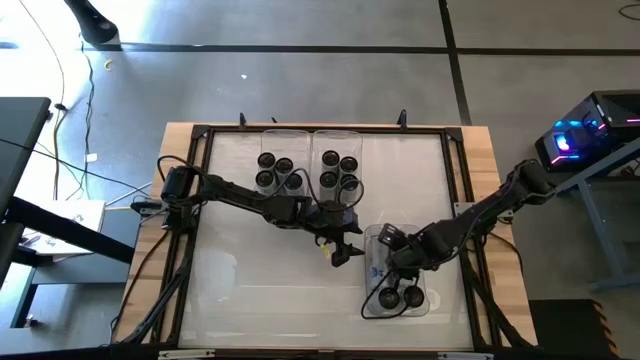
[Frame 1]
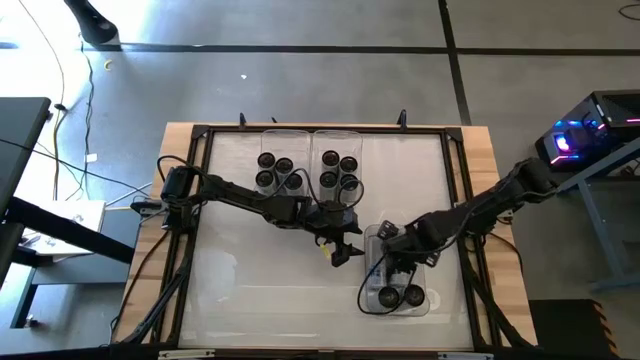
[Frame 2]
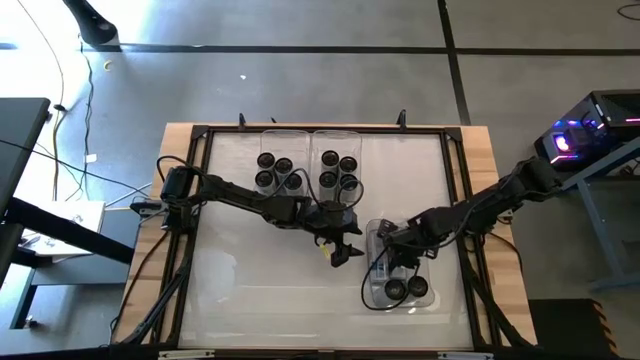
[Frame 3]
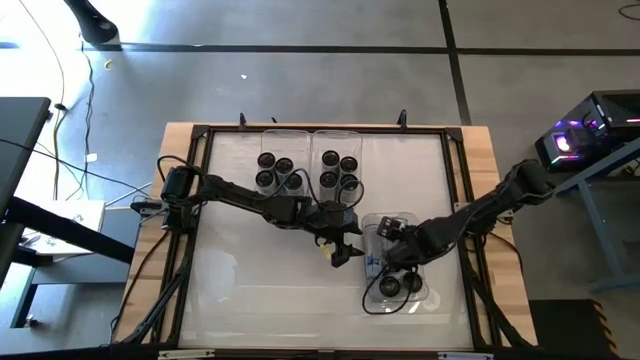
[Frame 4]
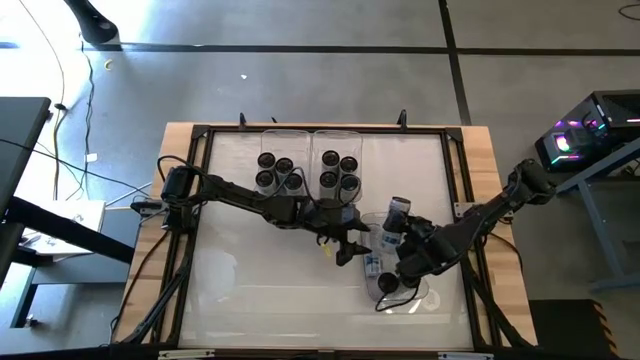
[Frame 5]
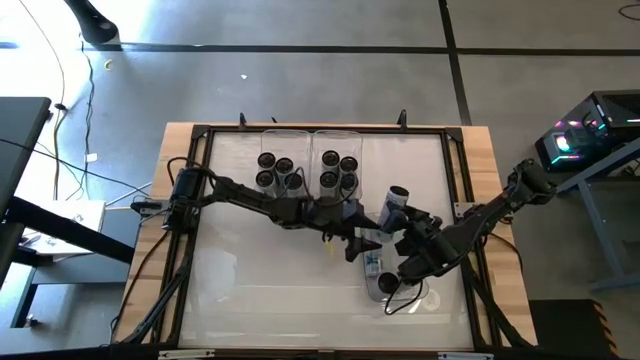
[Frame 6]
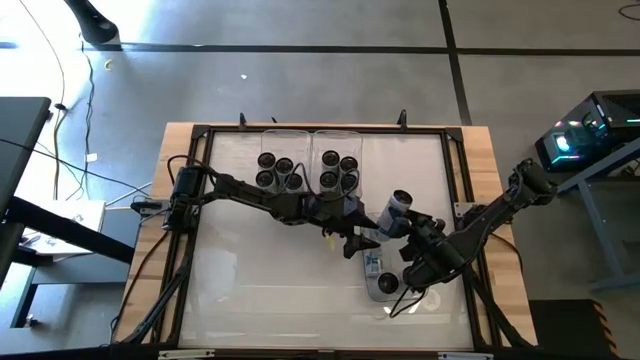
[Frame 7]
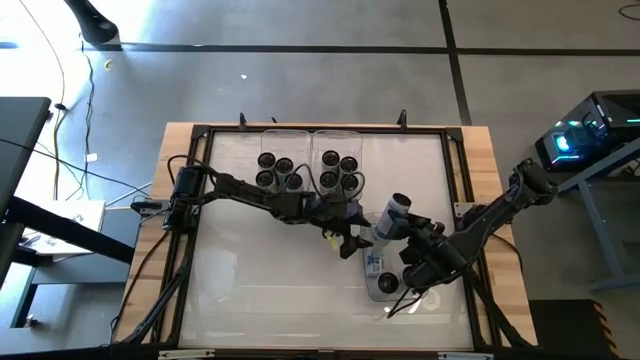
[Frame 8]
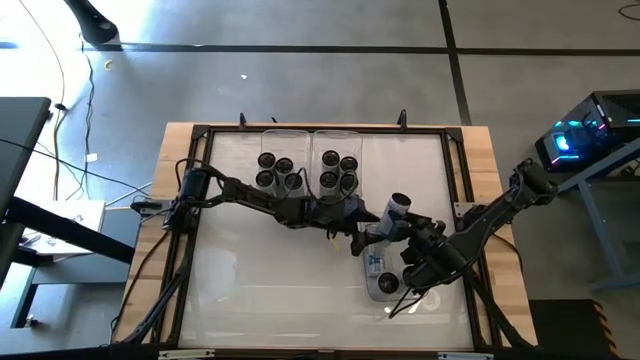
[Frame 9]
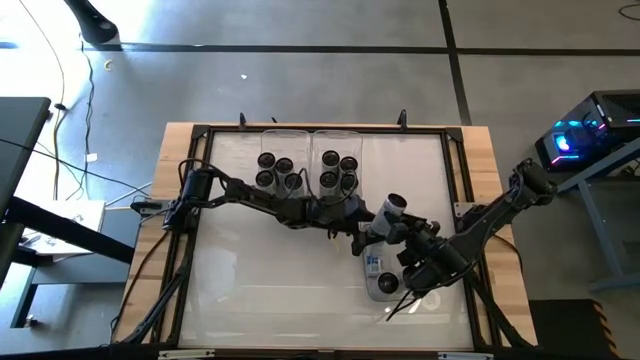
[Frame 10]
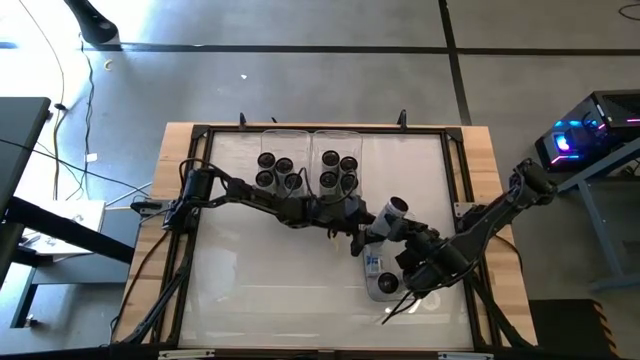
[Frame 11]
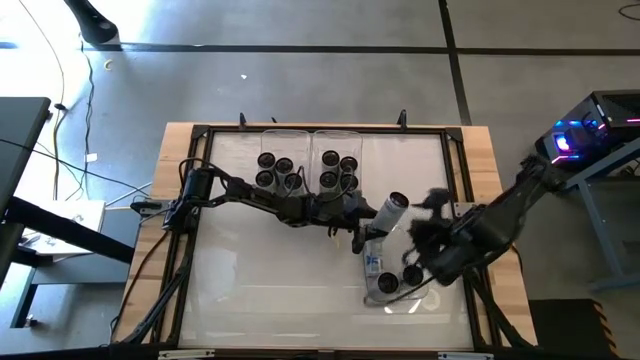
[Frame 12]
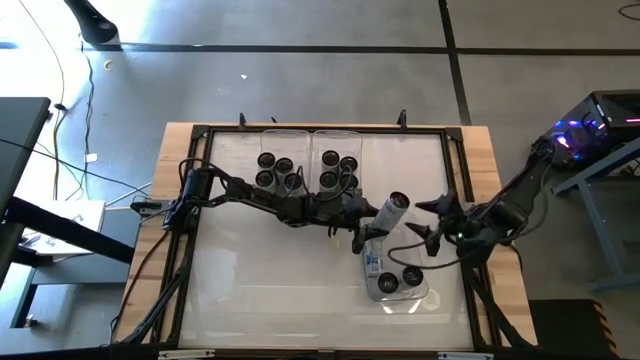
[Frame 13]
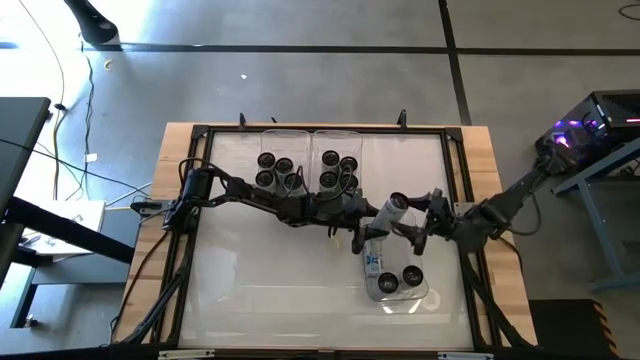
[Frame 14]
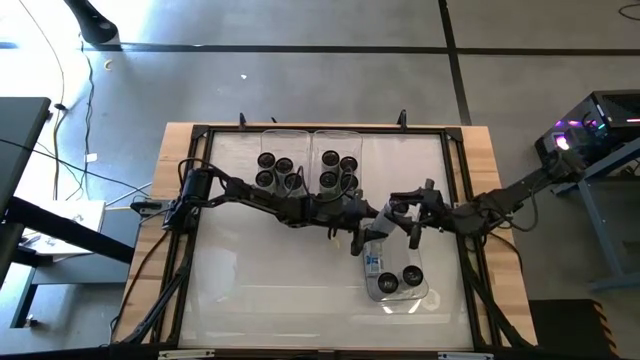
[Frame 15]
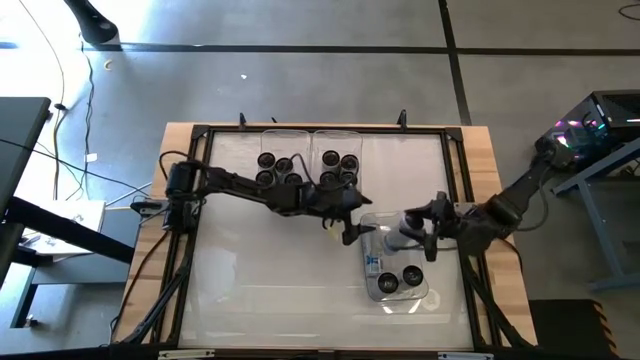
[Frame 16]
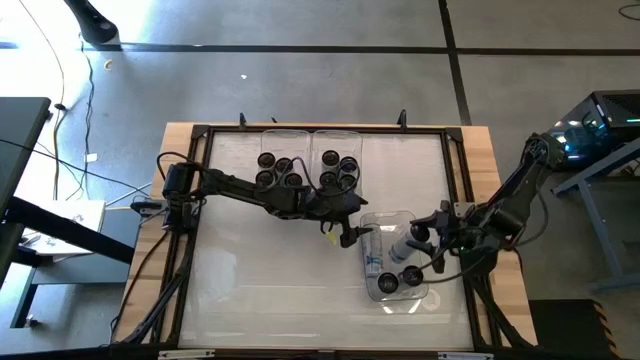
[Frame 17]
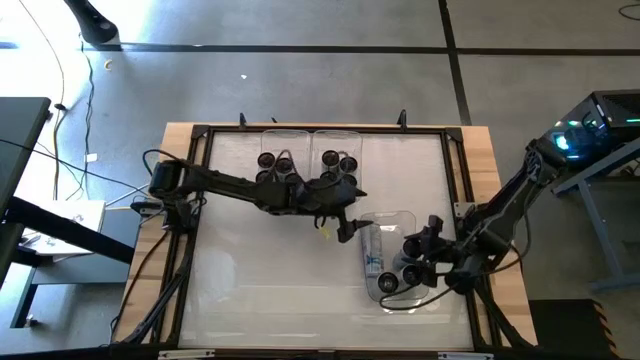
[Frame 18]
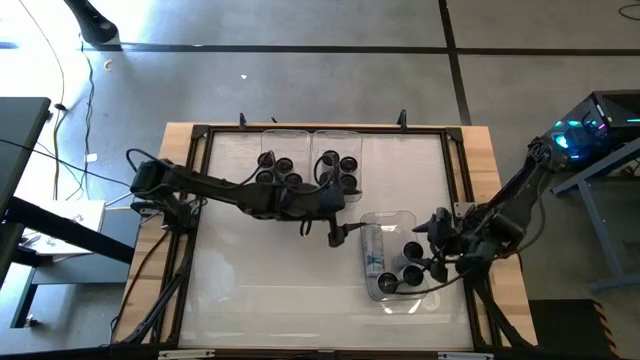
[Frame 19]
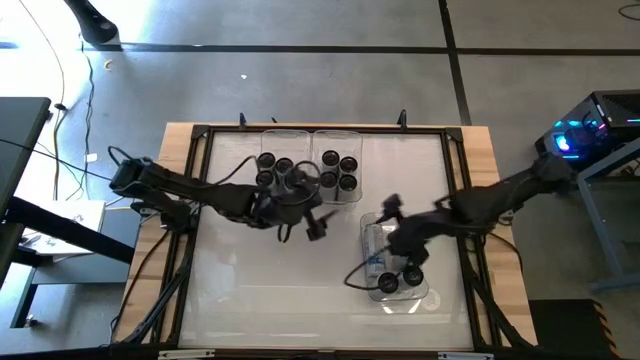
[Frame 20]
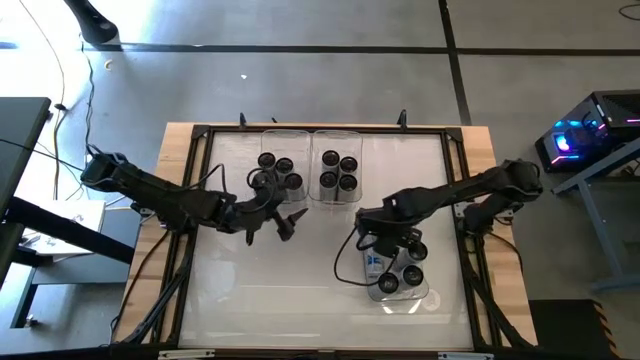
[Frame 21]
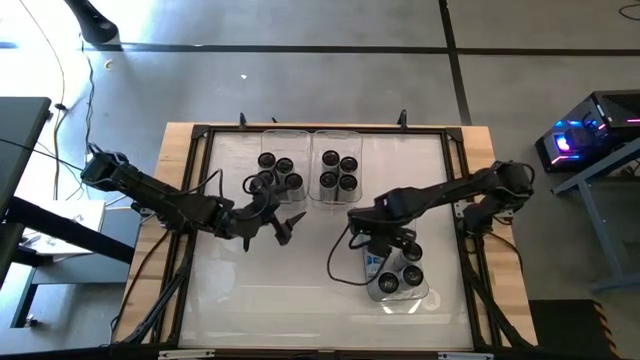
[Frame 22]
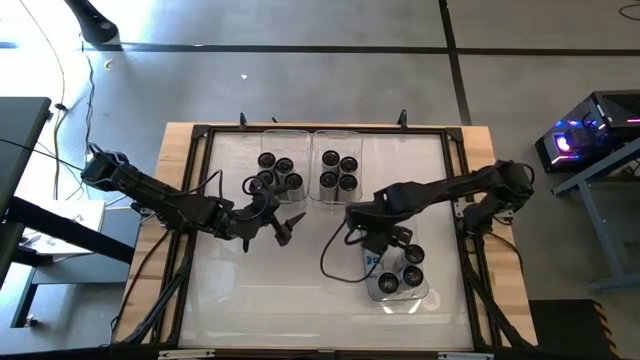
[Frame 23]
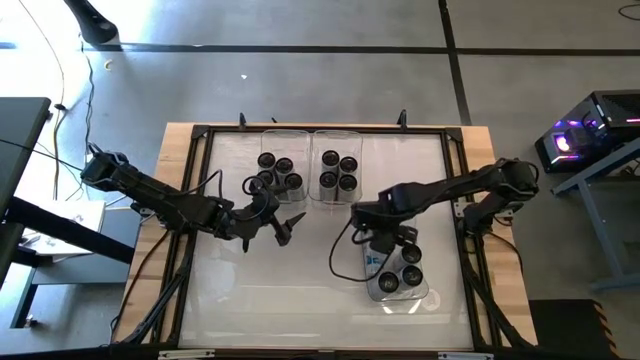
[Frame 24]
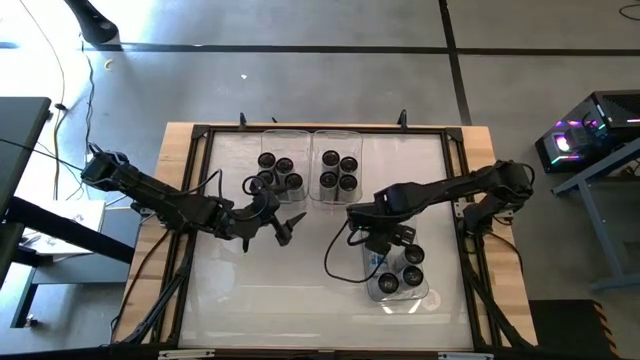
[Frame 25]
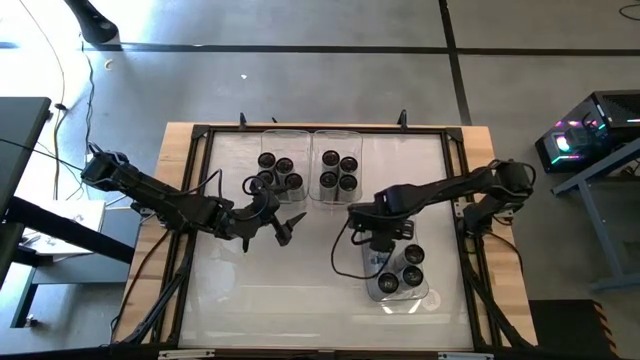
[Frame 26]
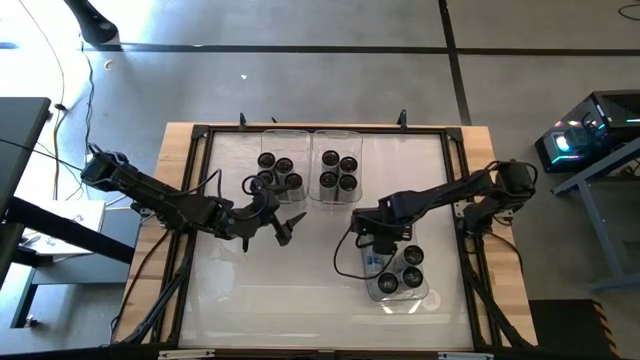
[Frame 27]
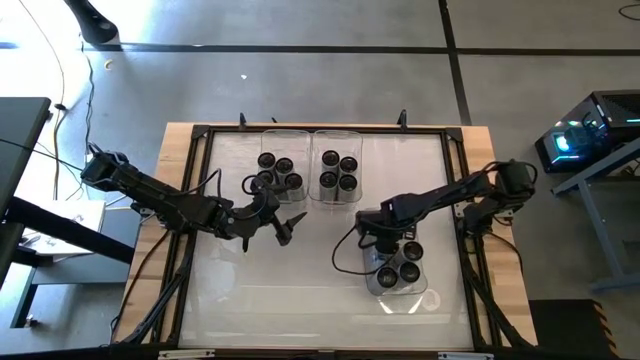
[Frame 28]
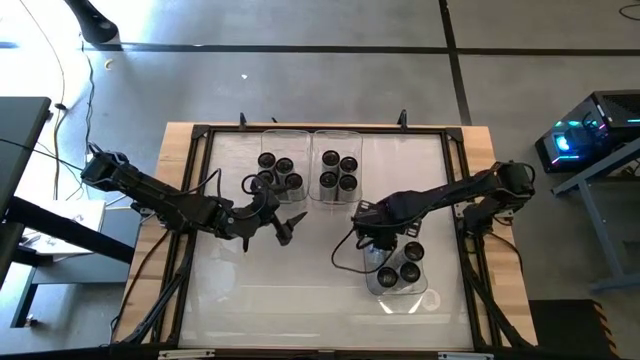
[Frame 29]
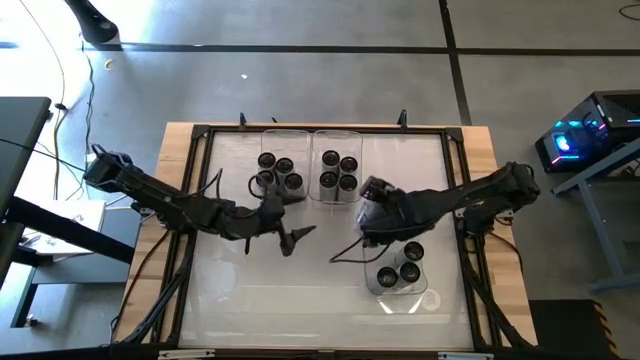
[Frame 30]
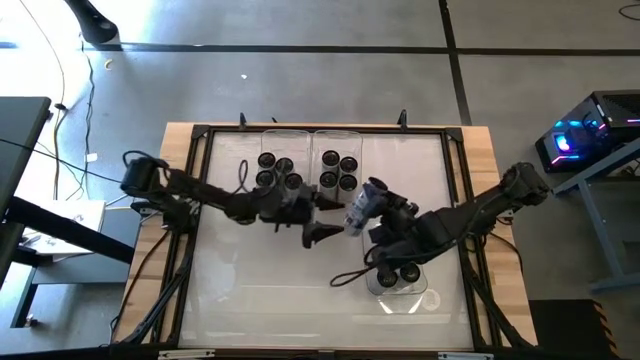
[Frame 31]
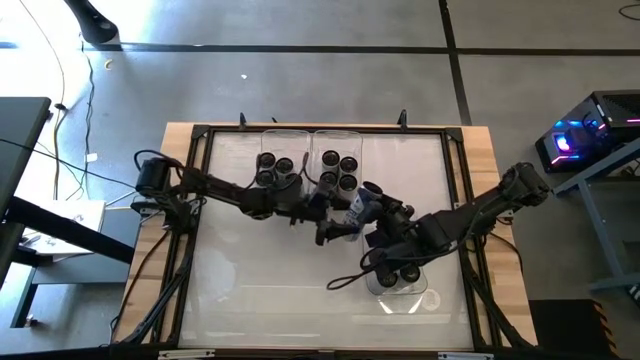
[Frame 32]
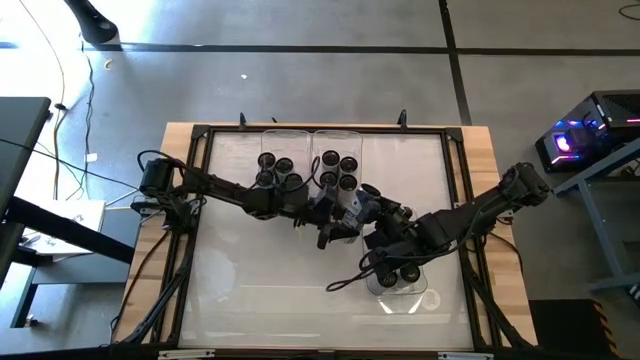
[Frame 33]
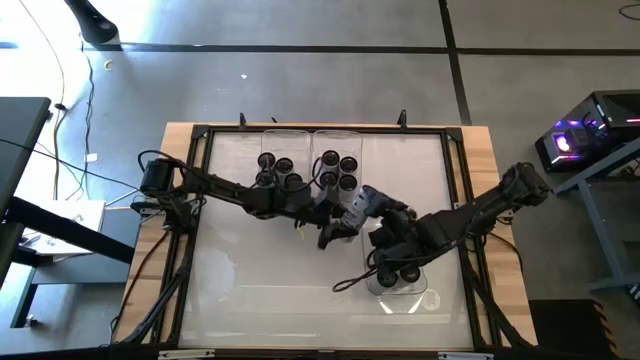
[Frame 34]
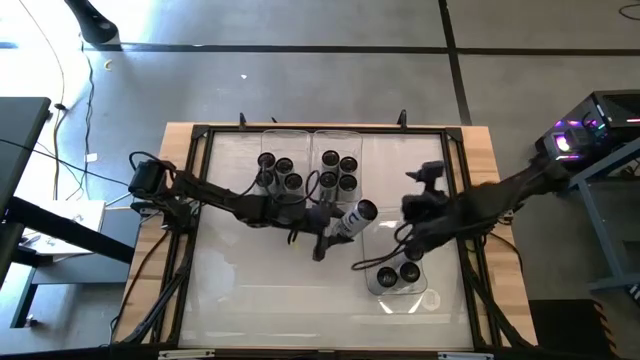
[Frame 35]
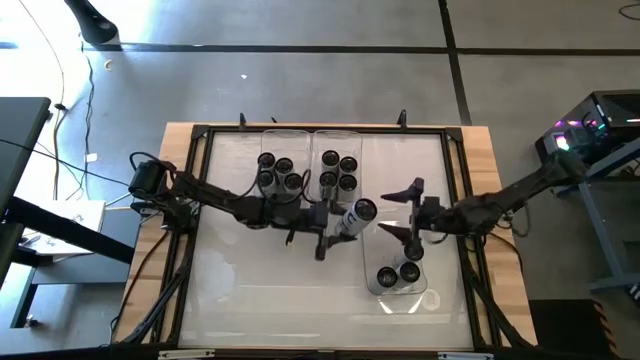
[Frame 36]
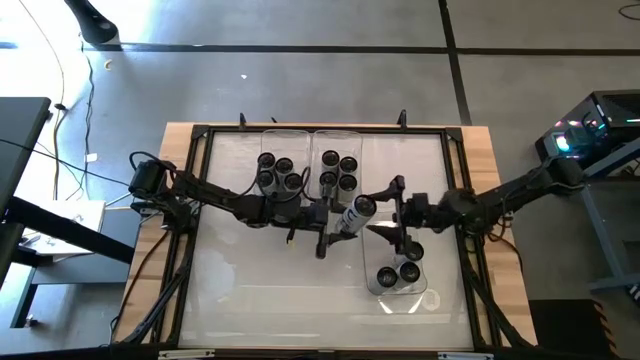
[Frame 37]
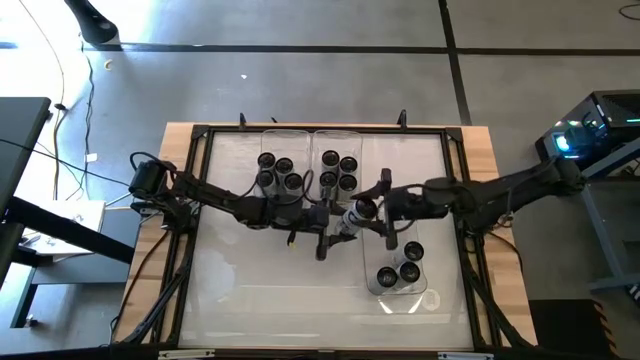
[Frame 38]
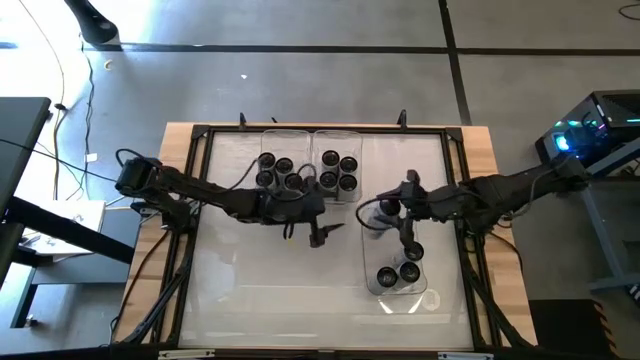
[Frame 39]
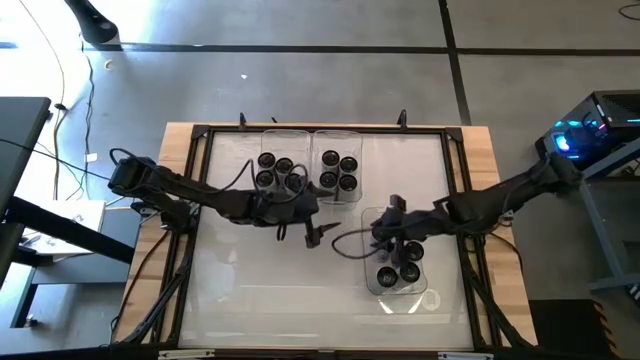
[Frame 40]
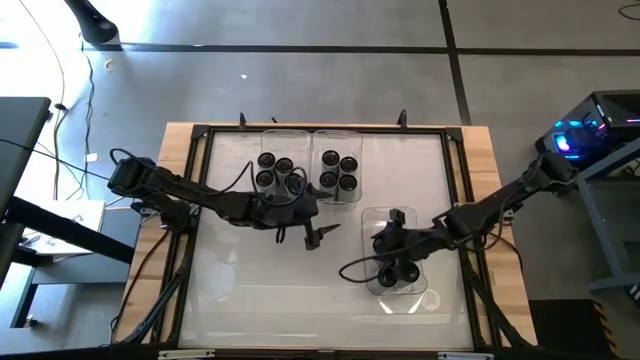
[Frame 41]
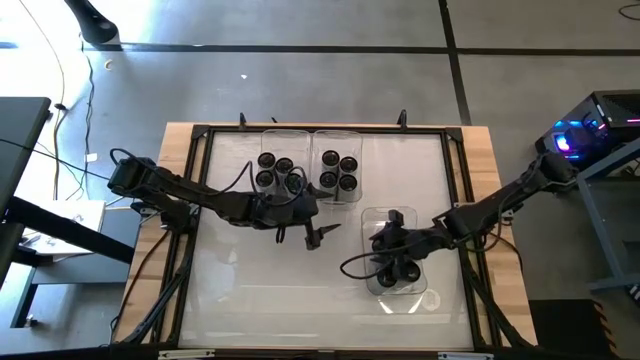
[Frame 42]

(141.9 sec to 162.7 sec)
Task: Sort soda cans
Adjust the blue soda cans in the bottom right transparent bin
